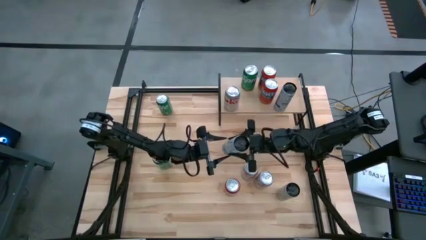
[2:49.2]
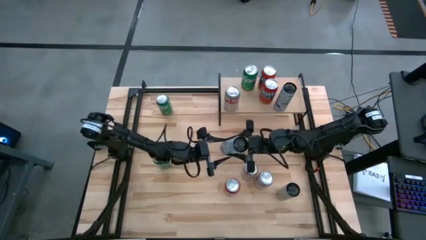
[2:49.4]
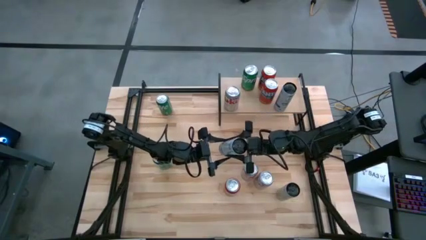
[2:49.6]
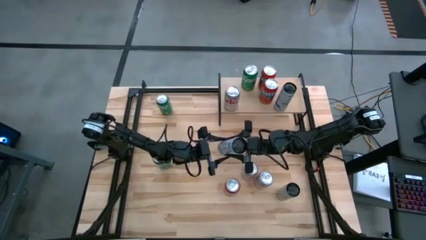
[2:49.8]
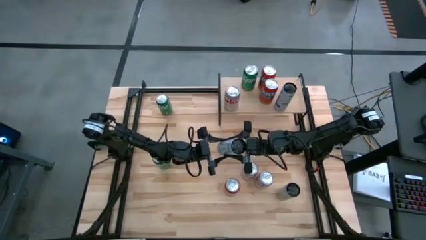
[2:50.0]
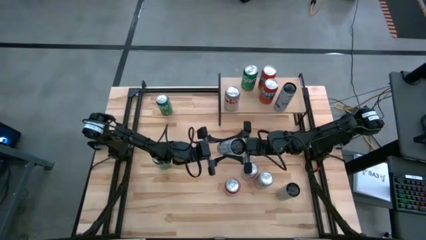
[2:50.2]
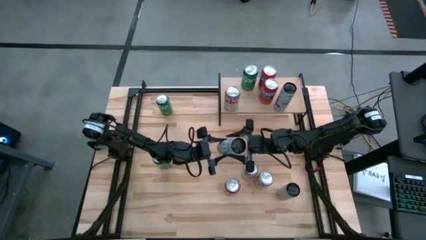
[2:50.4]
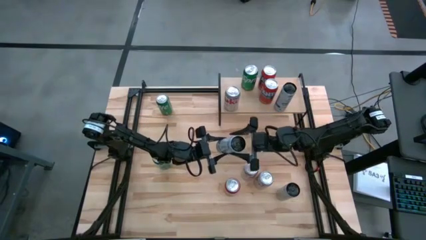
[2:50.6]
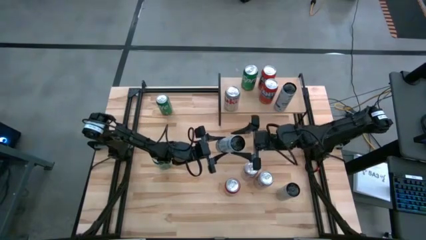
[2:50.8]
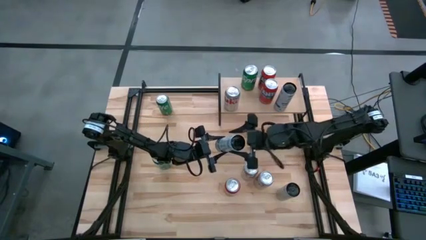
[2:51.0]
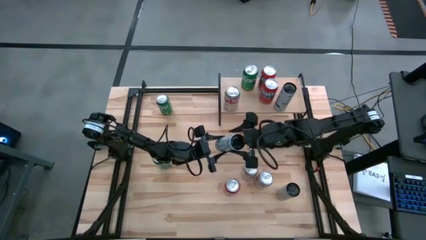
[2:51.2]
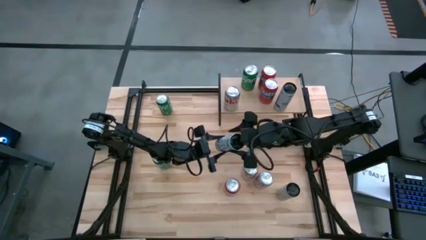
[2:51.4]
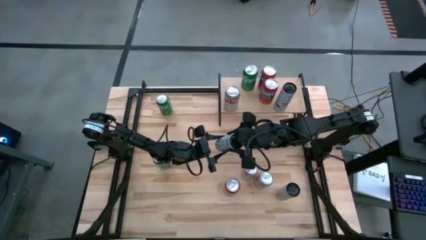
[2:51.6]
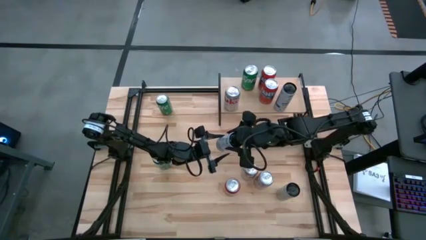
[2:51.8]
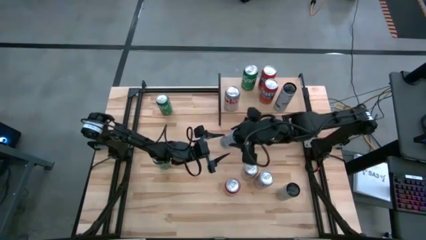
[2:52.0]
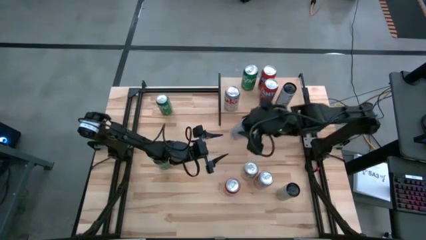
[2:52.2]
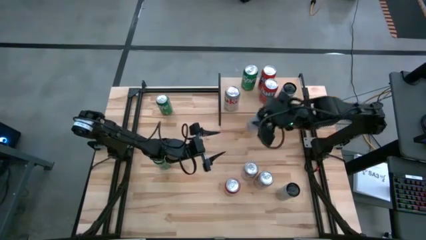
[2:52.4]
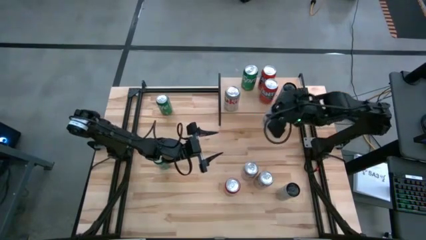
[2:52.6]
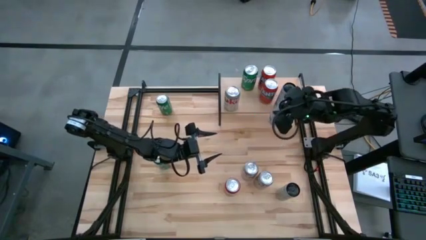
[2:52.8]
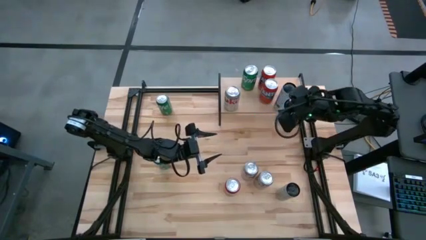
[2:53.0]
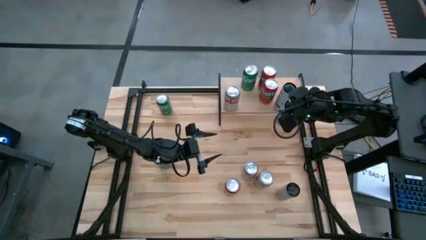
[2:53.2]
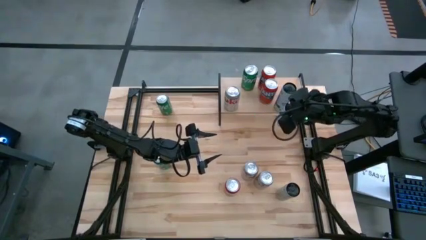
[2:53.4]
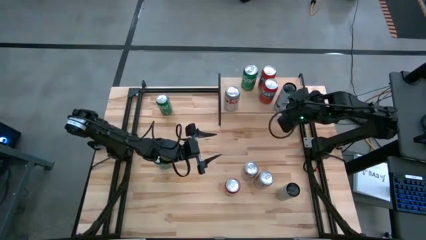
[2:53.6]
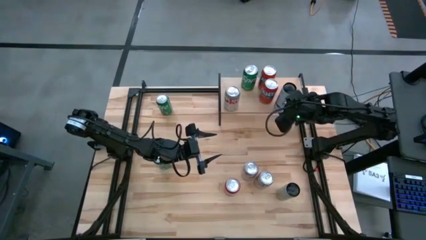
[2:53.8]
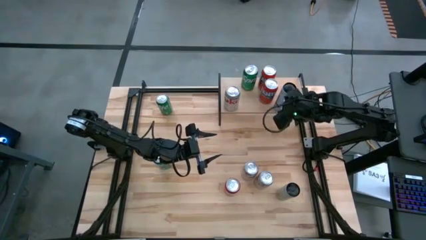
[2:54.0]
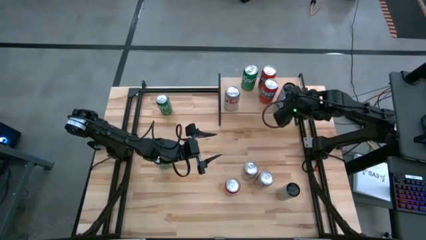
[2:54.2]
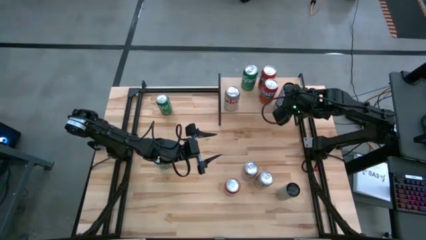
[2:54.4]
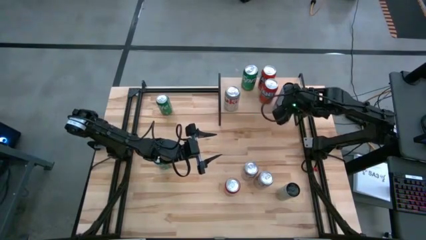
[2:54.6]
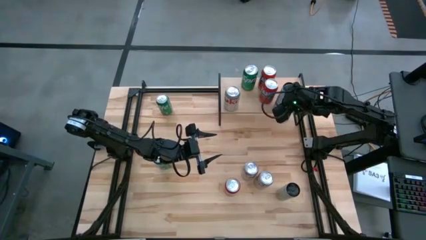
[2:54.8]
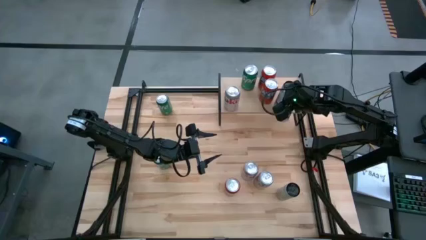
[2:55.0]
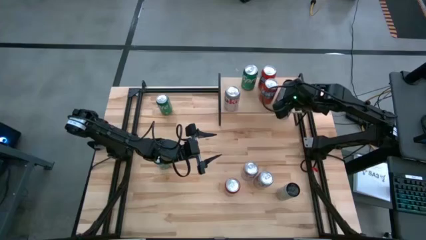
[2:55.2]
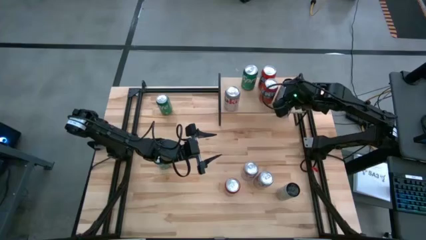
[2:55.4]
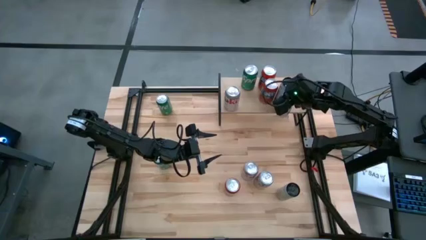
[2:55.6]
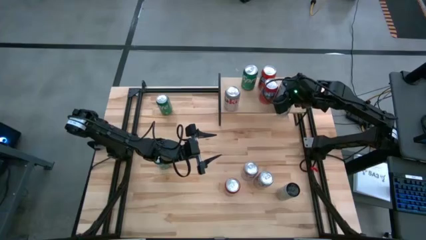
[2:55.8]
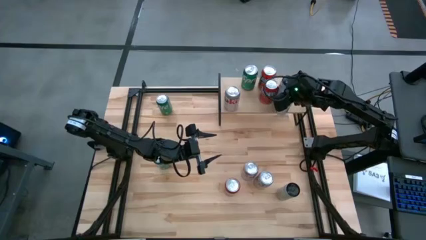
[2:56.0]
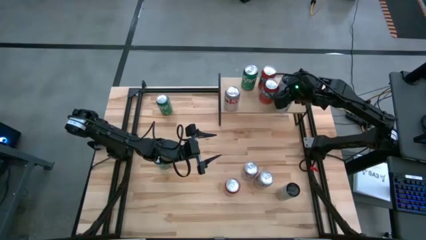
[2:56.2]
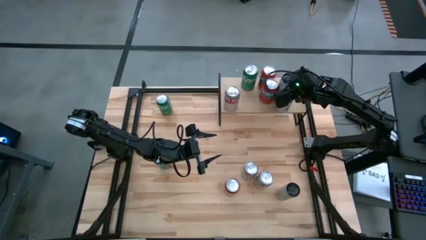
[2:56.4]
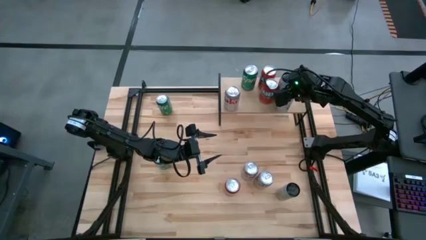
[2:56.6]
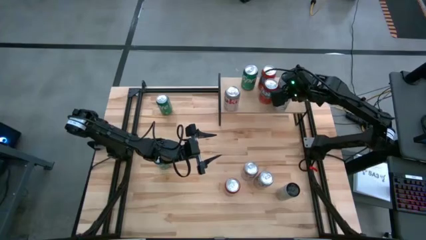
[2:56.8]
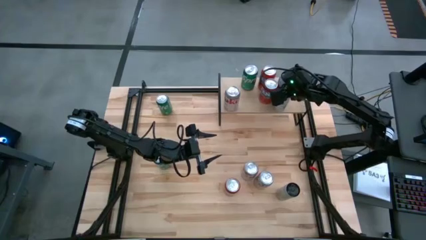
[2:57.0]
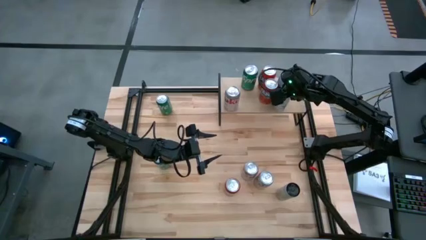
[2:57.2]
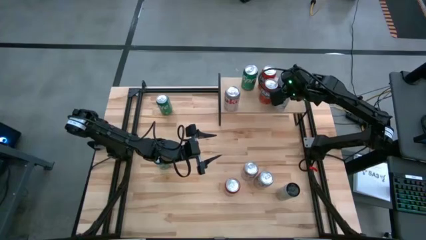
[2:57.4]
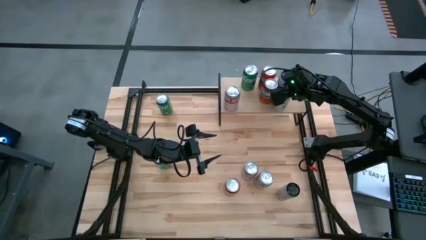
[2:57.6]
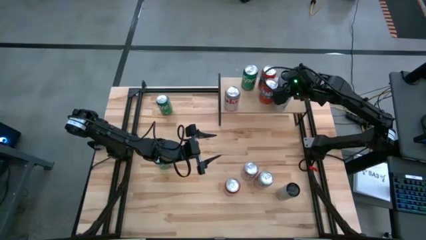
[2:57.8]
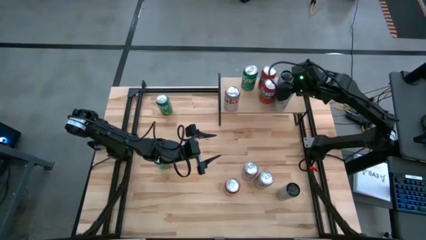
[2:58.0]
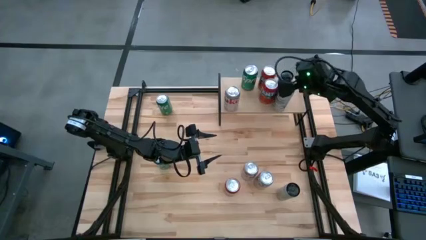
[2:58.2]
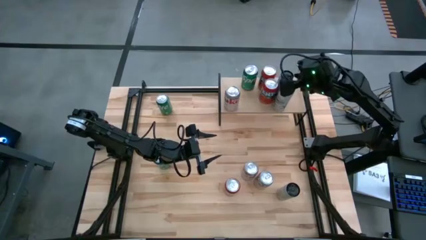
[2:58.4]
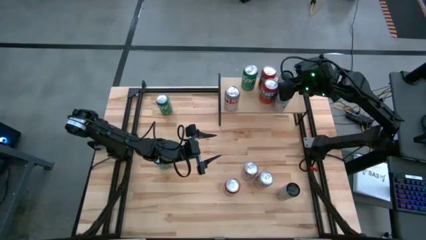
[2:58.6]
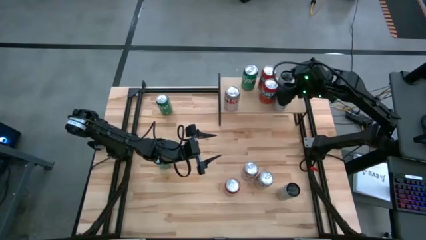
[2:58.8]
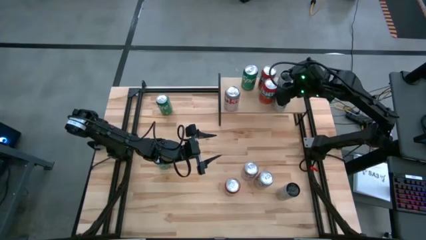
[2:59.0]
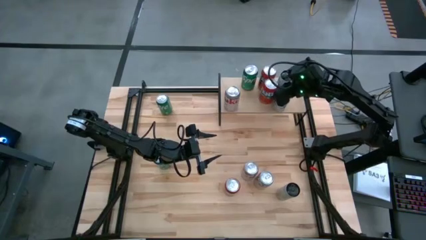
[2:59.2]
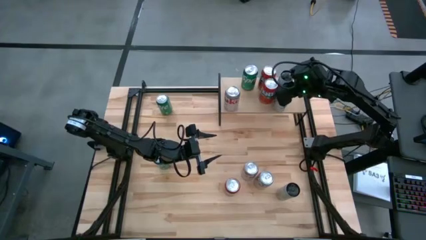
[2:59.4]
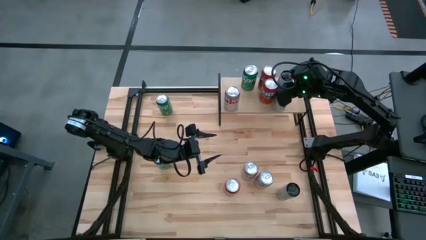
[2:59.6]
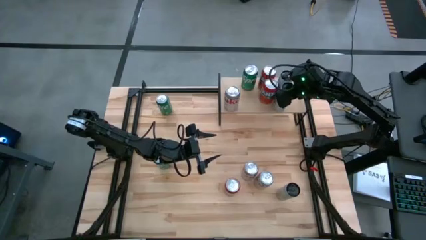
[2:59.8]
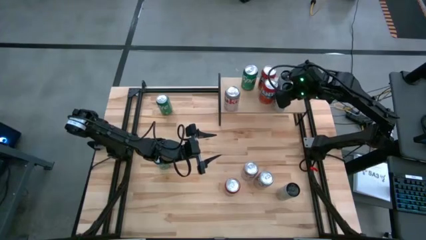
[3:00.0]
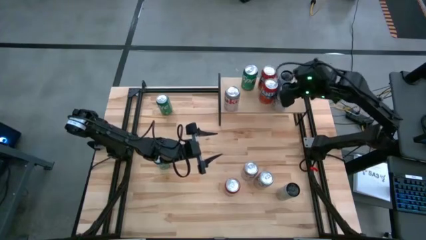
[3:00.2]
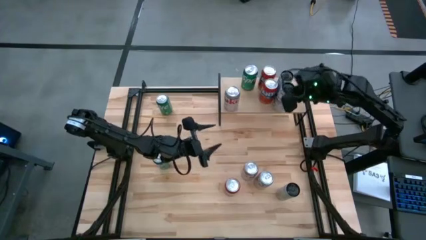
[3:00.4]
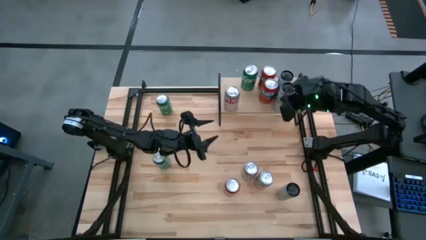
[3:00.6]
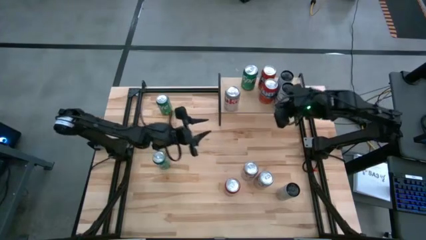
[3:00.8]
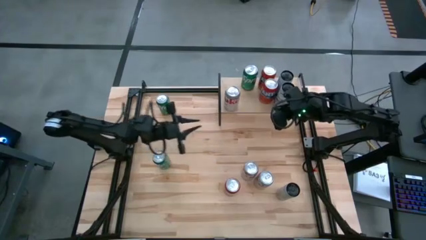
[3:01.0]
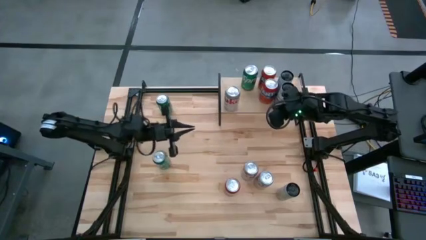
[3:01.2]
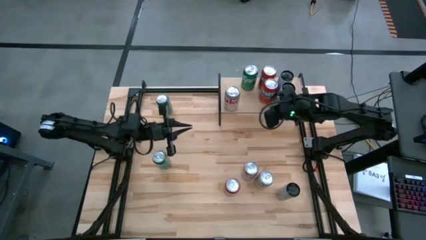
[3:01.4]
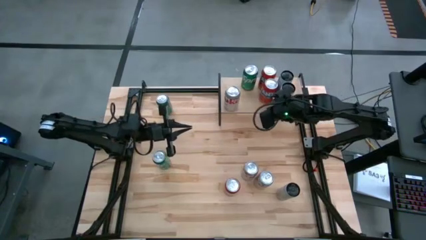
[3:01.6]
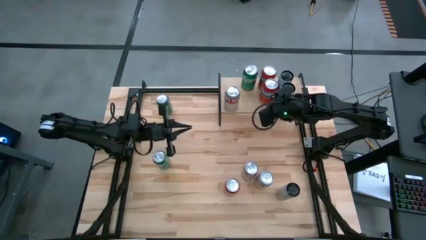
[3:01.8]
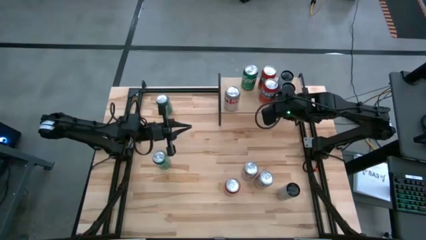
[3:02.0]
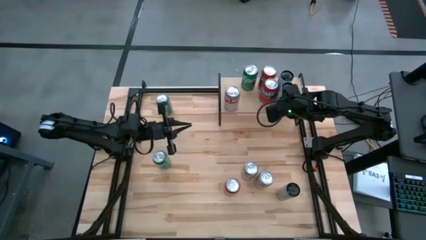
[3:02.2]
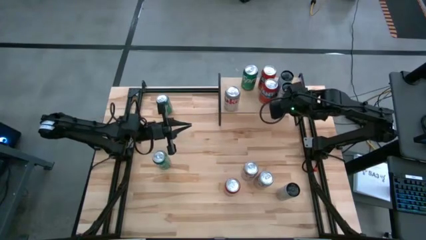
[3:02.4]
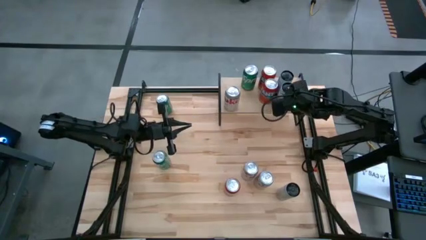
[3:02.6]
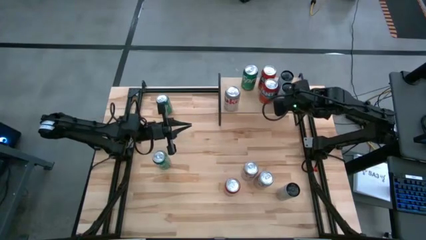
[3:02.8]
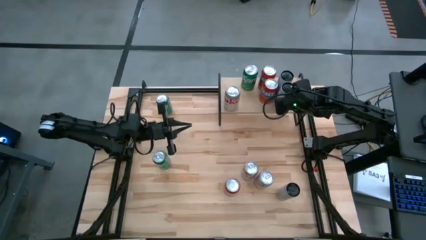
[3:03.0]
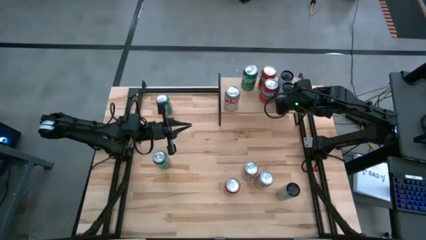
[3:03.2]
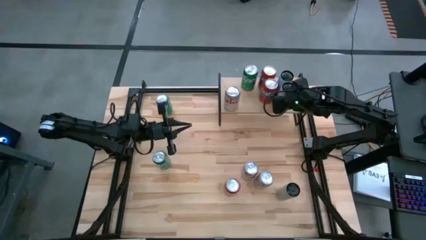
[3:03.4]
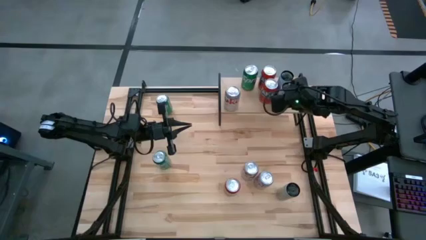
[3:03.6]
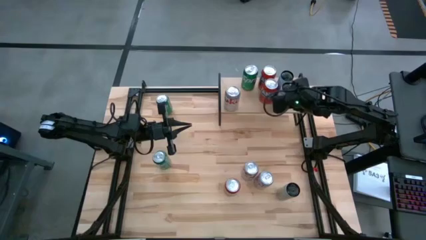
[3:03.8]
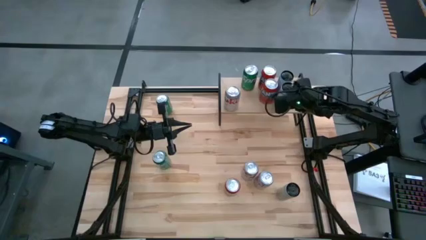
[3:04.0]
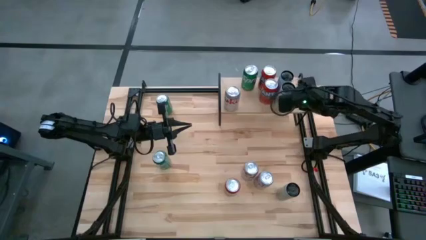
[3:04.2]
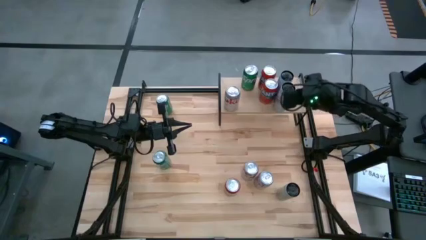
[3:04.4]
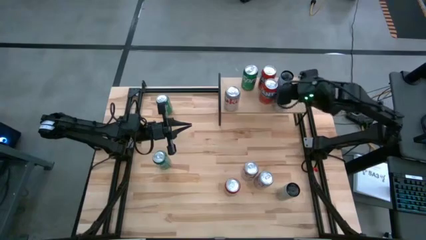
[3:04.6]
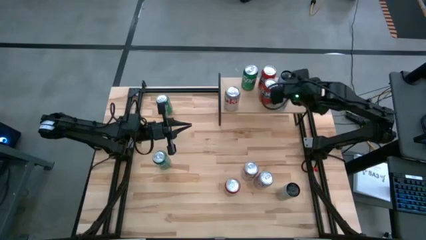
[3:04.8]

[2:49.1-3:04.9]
Task: Place canned beverage on shelf
Put the left white soda can on the shelf aligned in front of the other white soda can
